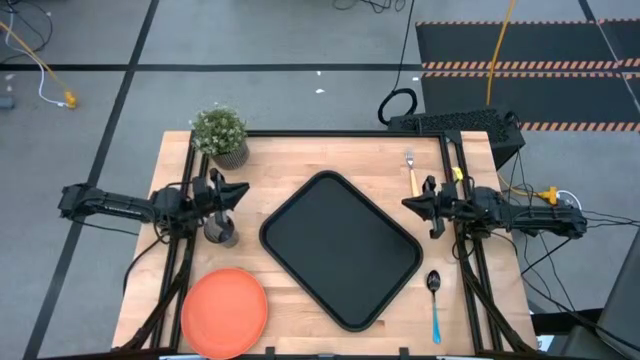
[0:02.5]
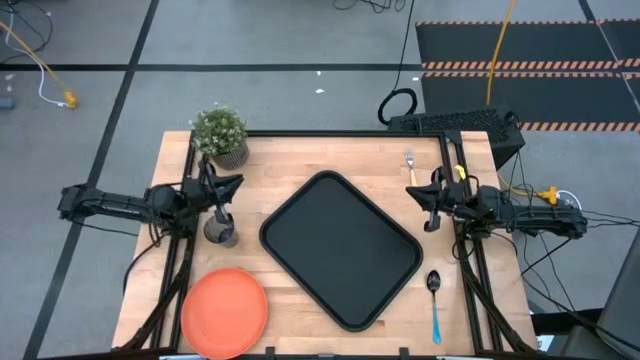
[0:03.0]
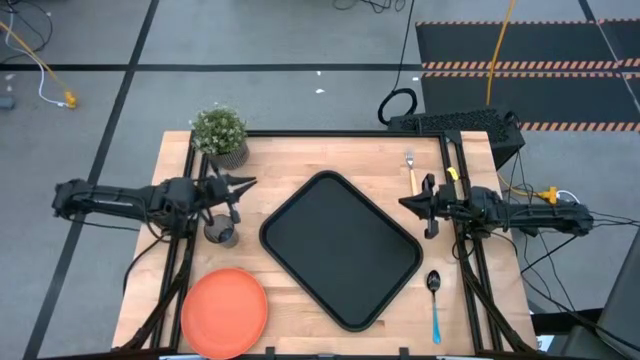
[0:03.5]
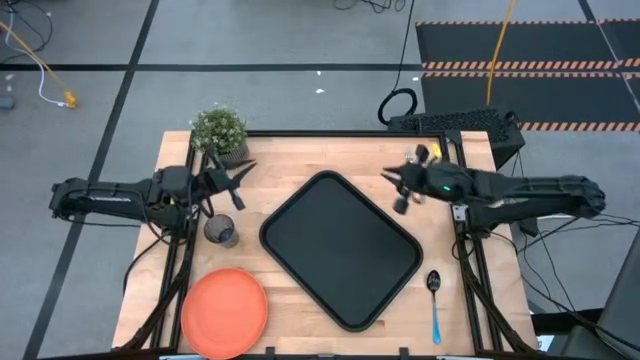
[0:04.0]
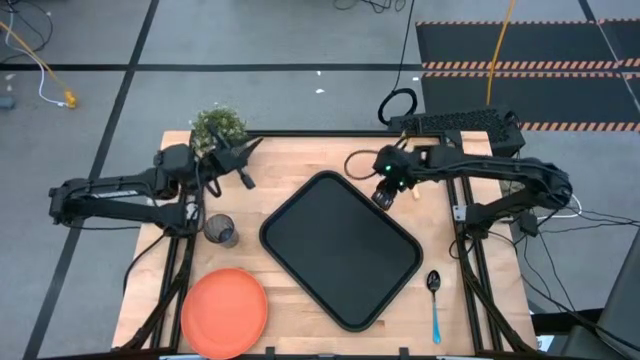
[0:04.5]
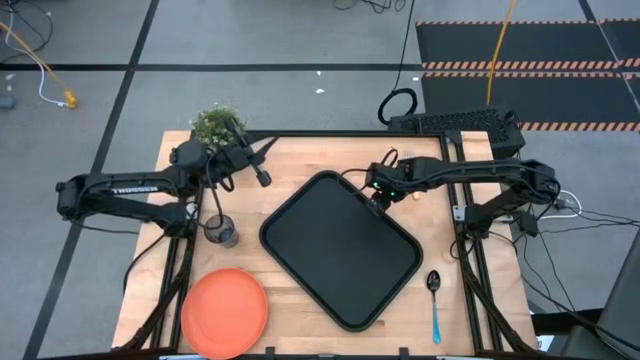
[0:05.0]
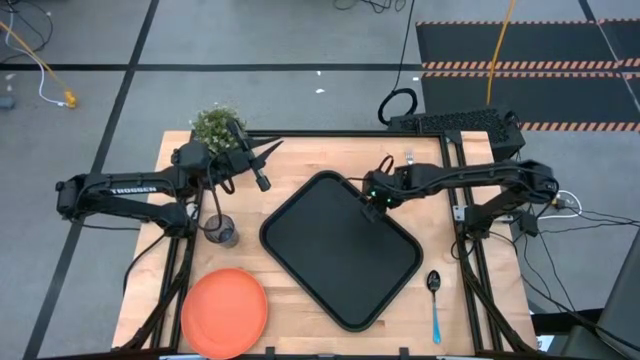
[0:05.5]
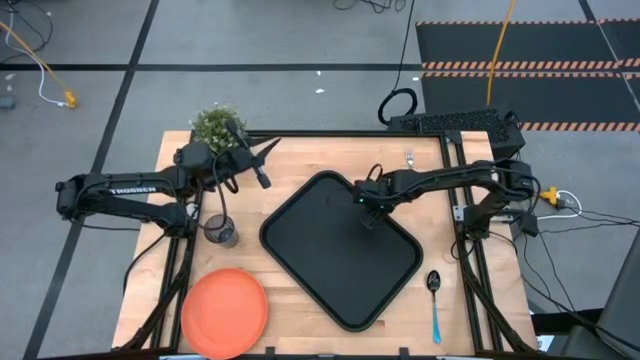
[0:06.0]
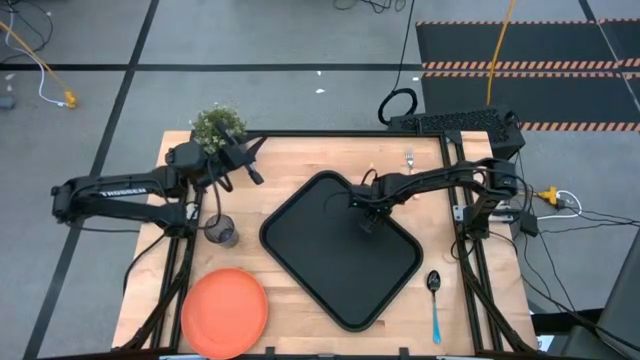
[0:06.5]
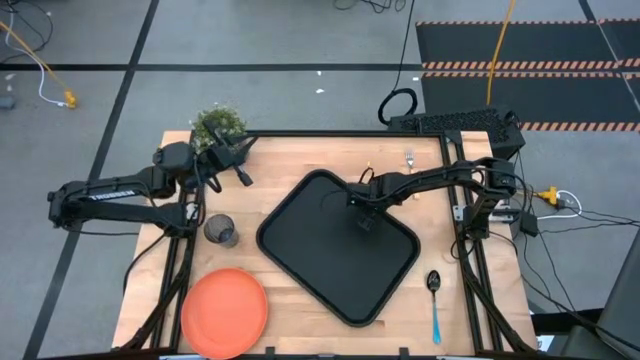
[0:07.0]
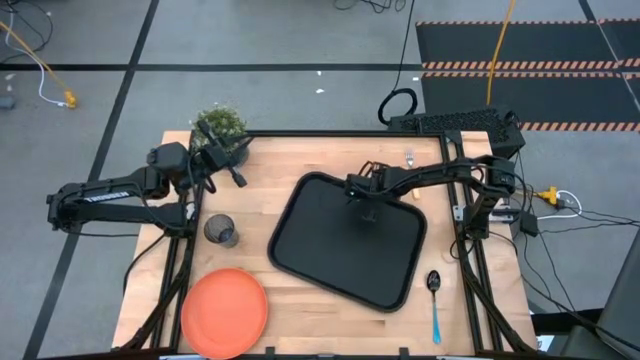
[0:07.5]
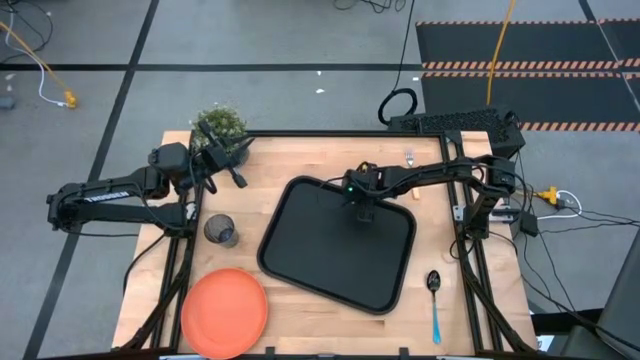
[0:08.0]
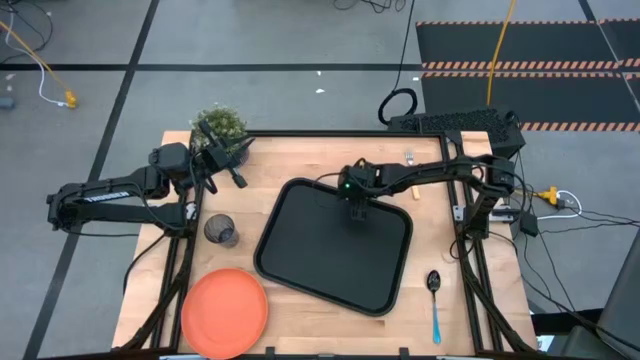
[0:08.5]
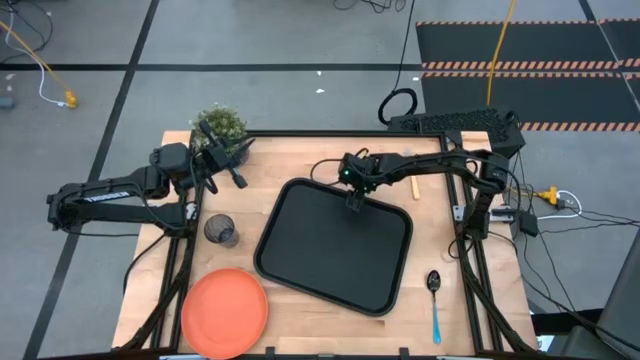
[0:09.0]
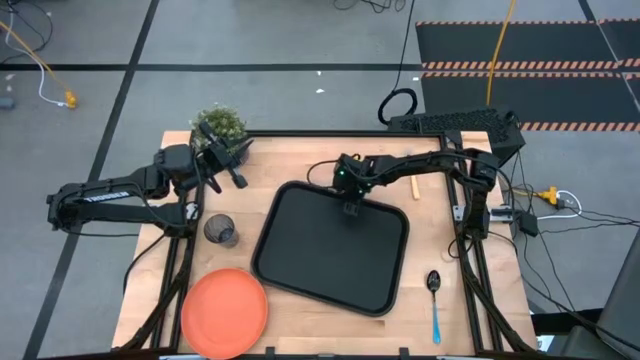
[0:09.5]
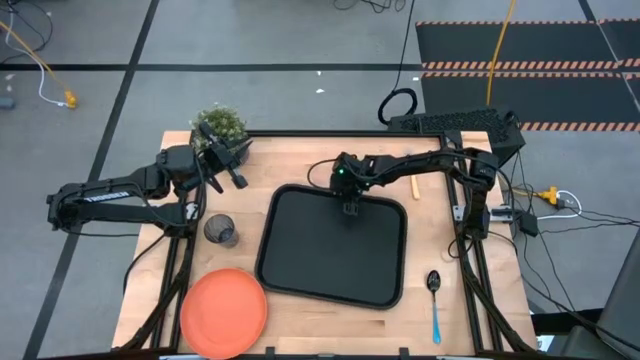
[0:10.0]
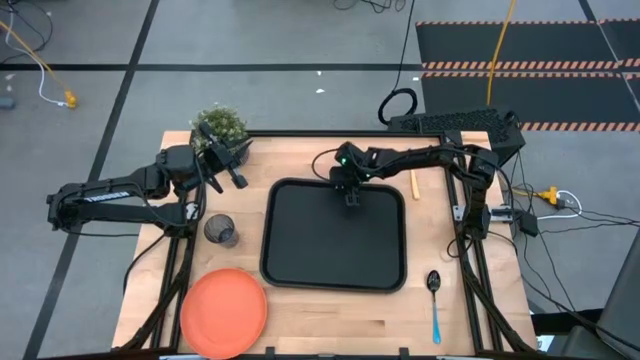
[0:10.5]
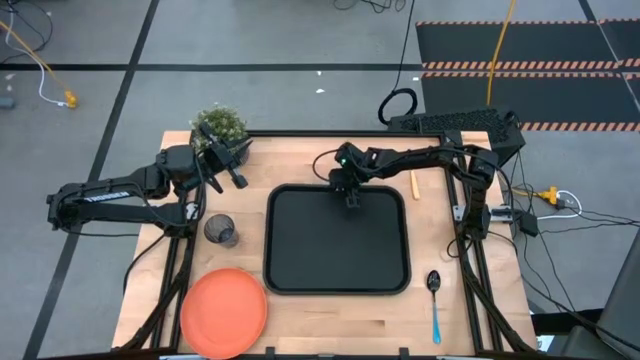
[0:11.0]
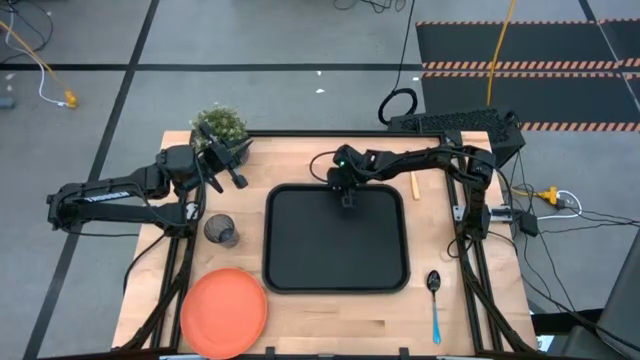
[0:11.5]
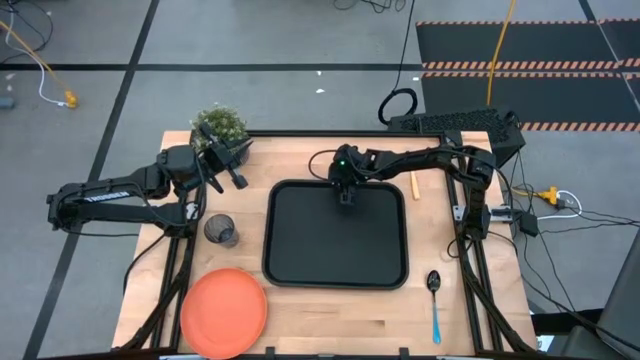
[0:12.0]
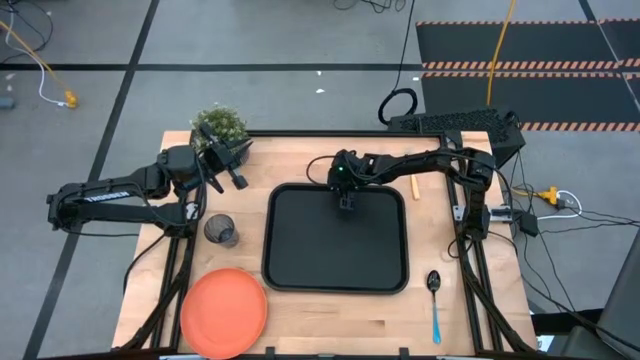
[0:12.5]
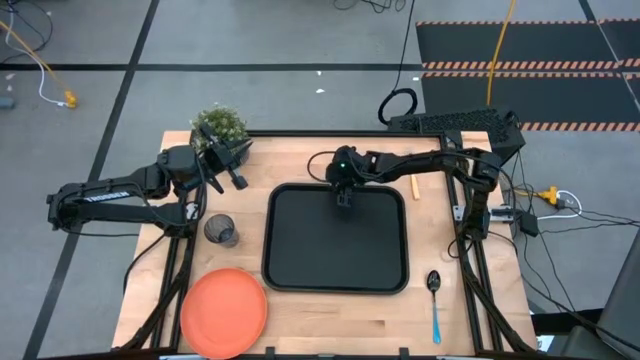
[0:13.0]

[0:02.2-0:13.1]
Task: Pick and place plate/cup/fork/spoon on tray
Adjust the black tray on the table

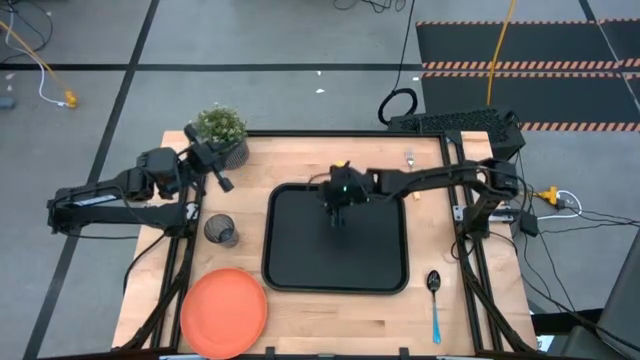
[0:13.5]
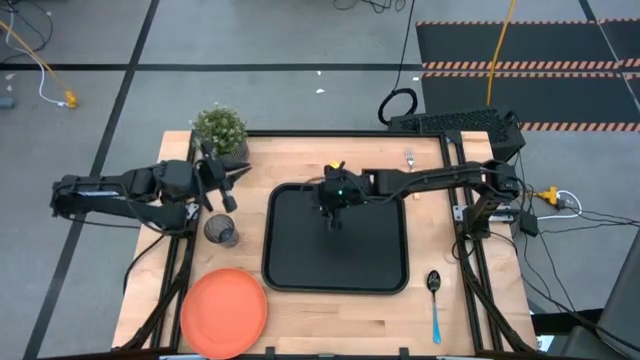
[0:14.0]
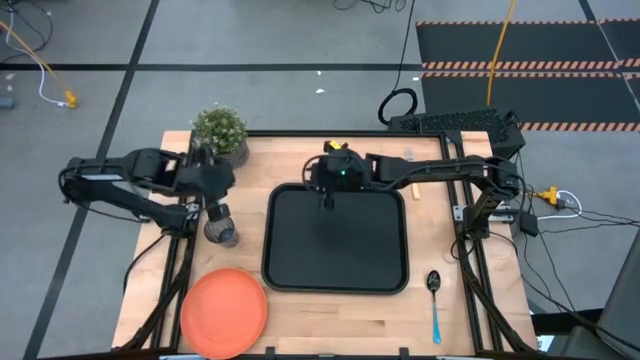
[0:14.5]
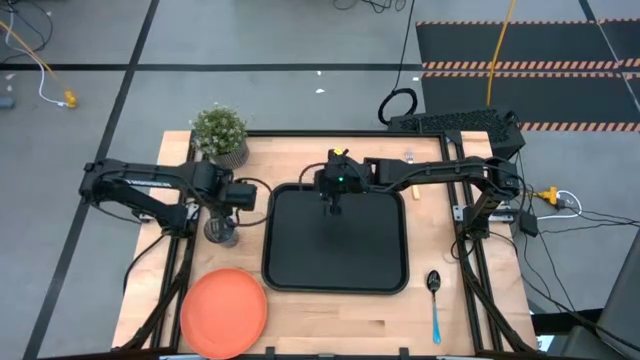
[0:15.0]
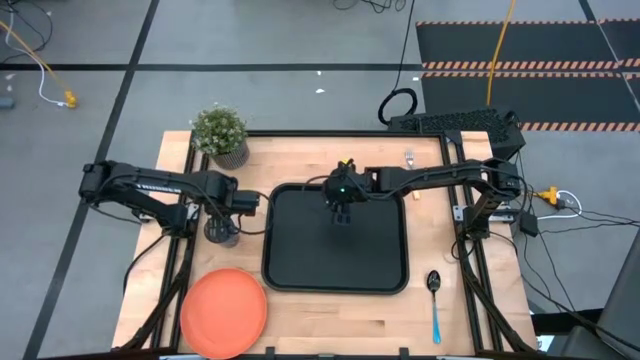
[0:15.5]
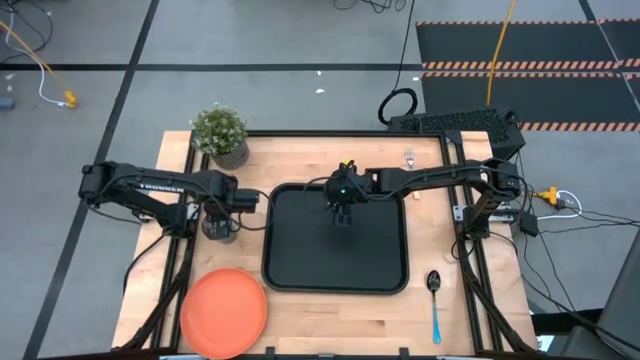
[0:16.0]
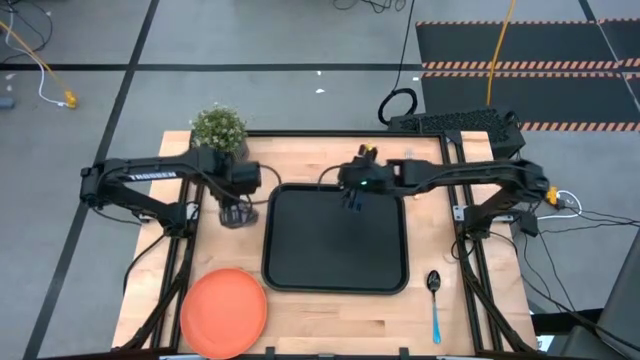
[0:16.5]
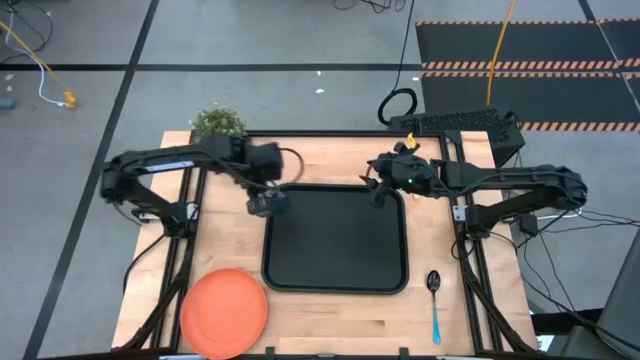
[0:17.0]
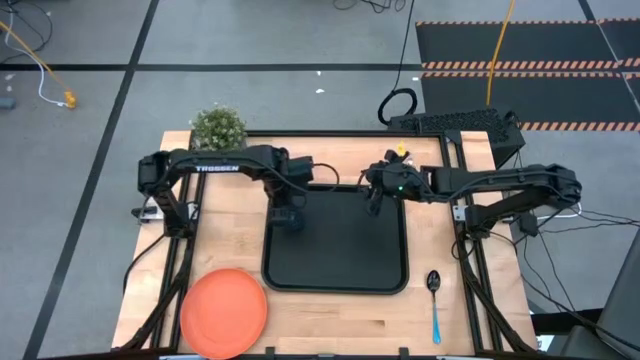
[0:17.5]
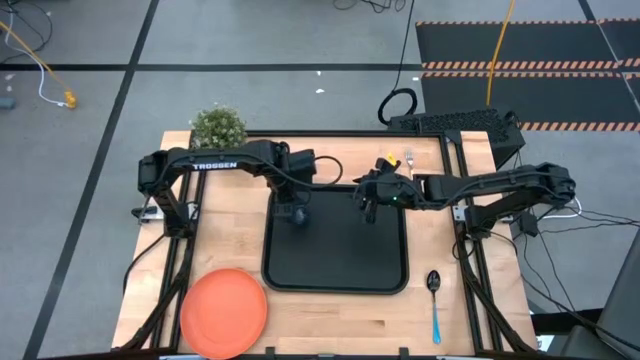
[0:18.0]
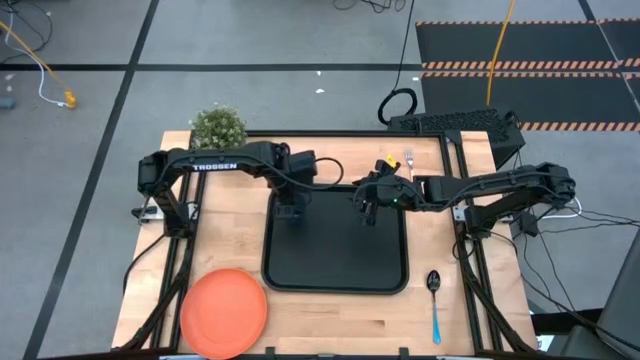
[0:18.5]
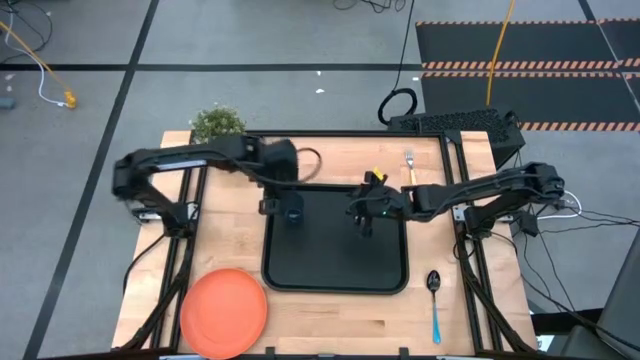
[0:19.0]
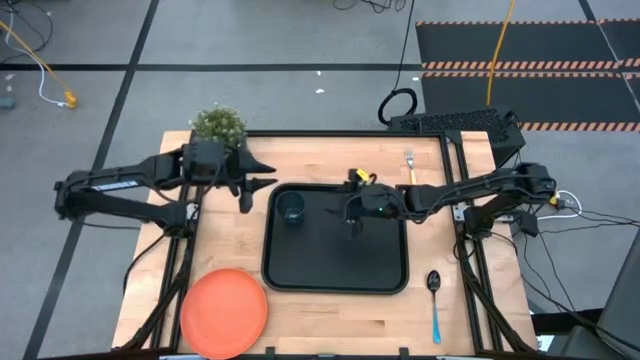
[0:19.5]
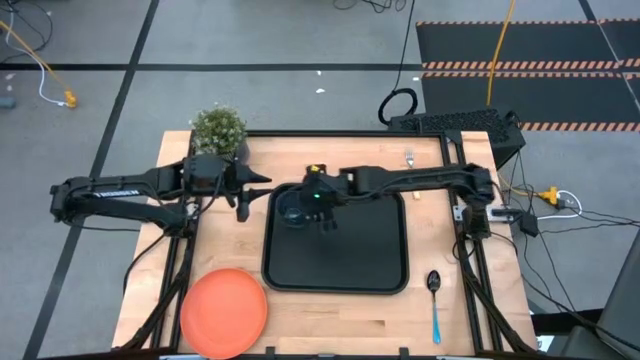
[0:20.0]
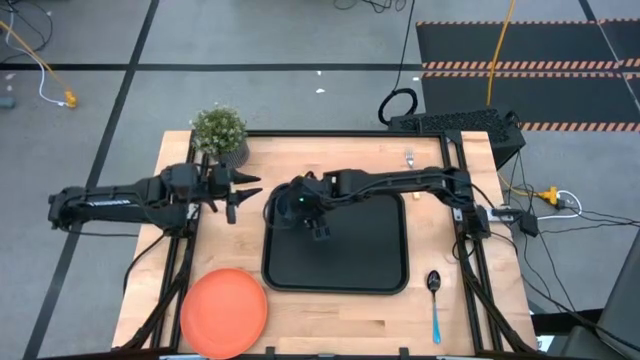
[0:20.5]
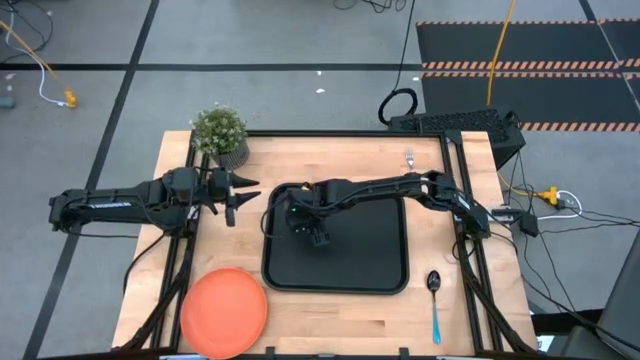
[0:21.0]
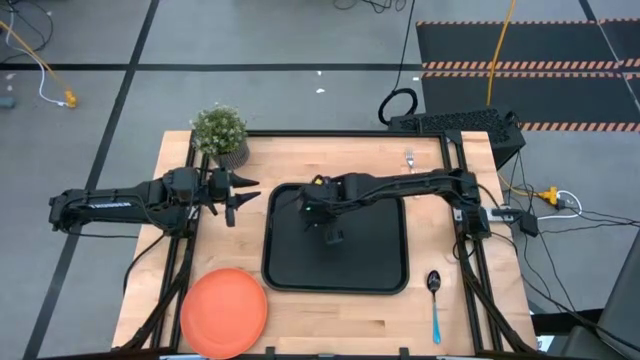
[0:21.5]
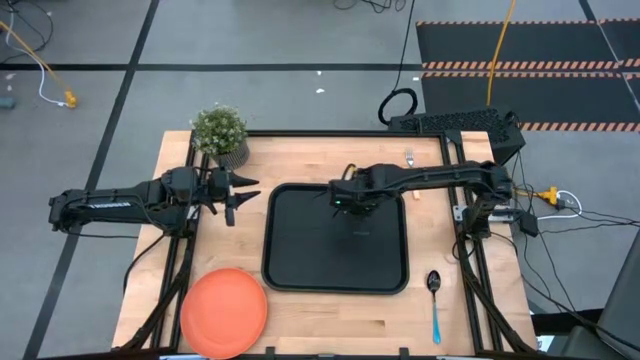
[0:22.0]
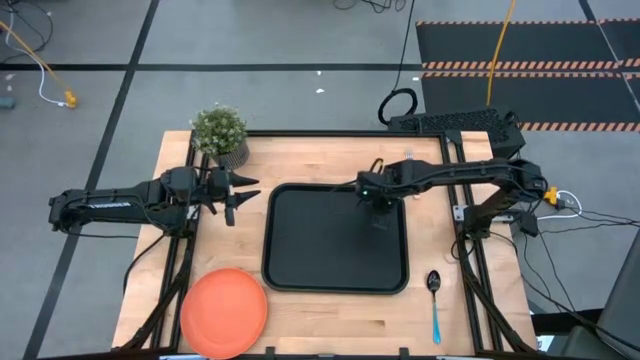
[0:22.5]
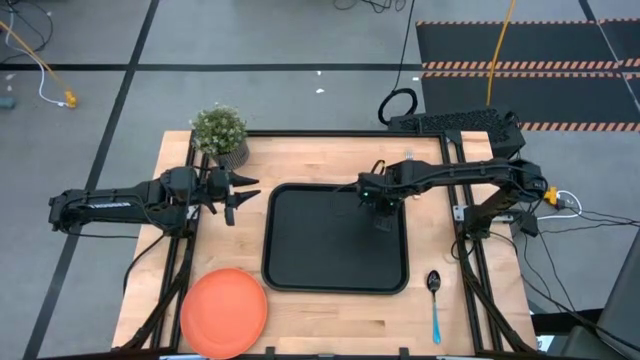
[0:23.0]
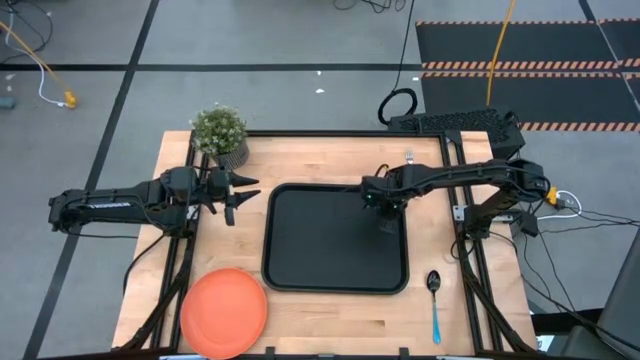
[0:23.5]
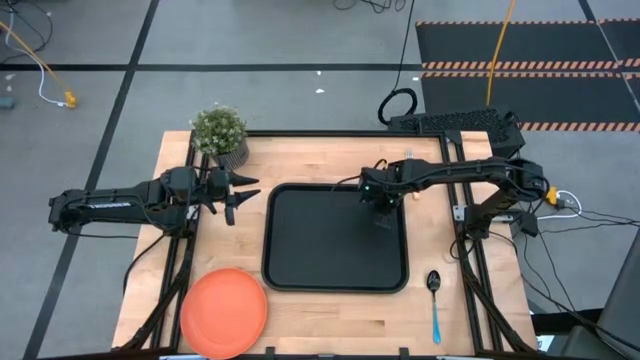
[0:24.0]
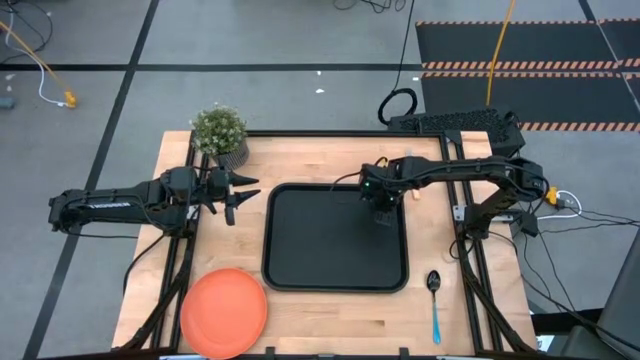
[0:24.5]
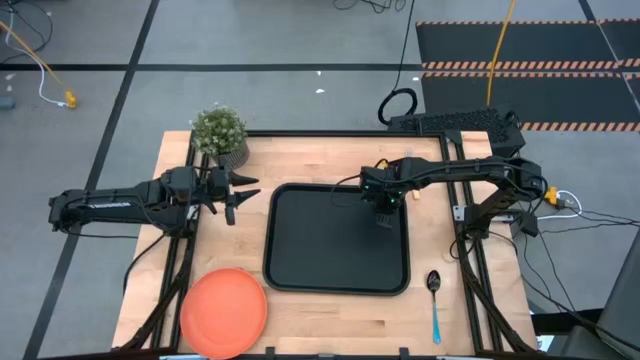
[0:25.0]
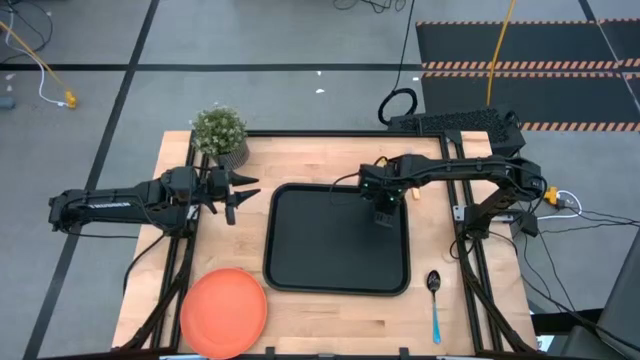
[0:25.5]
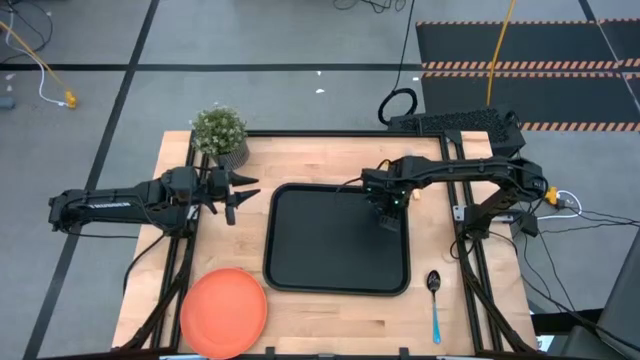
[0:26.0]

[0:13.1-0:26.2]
Put the blue cup on the black tray
